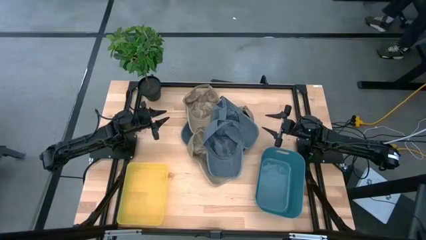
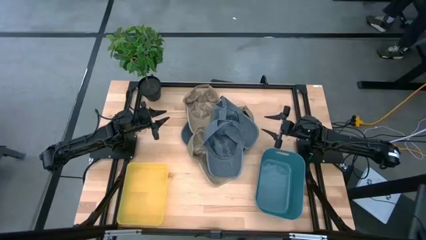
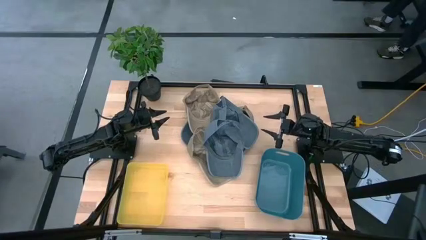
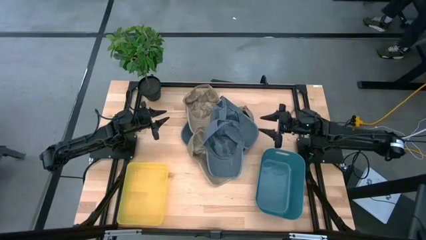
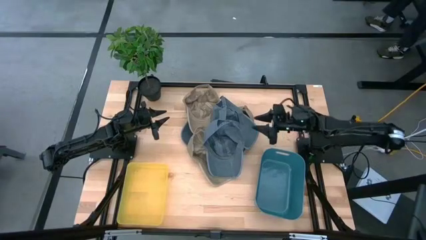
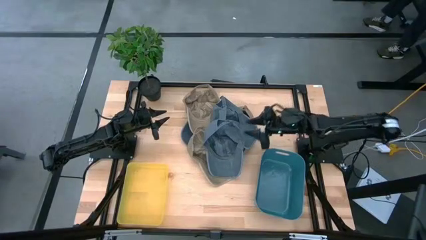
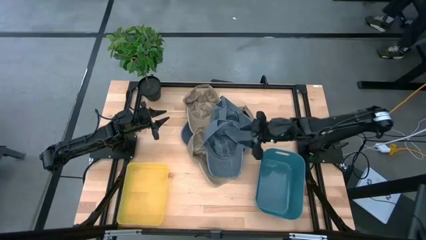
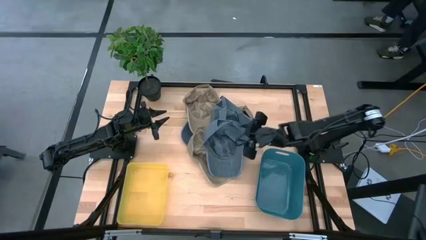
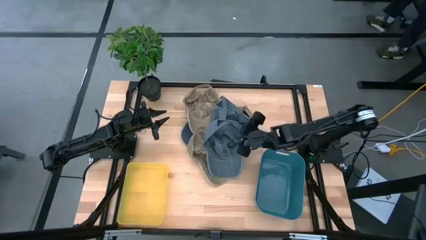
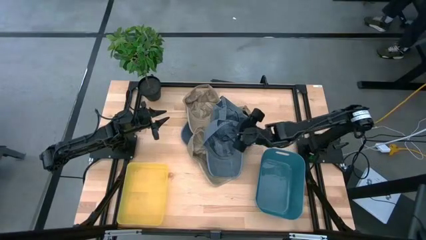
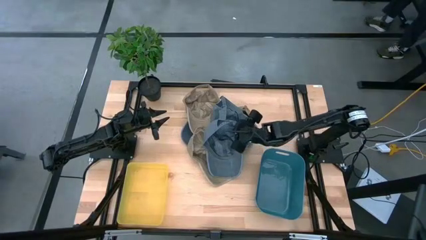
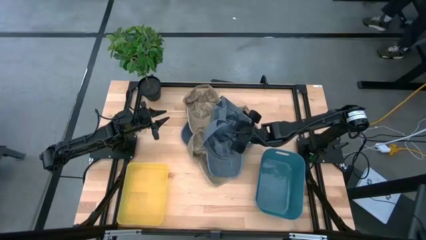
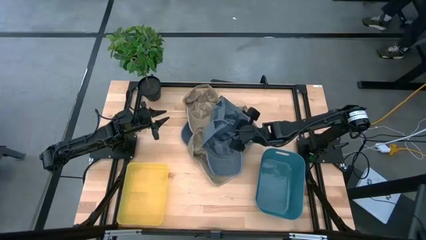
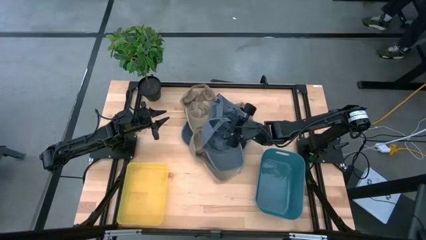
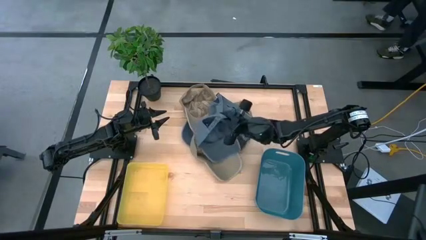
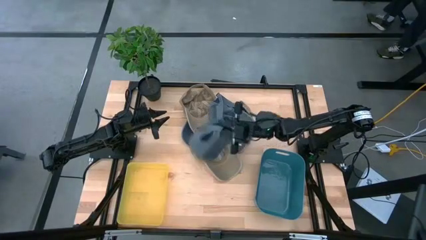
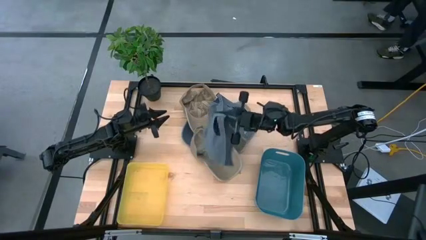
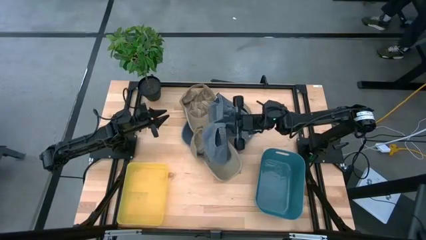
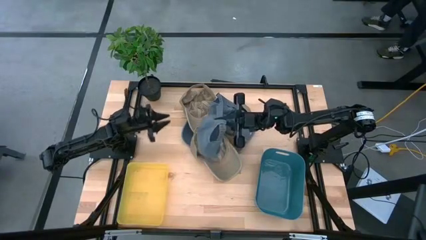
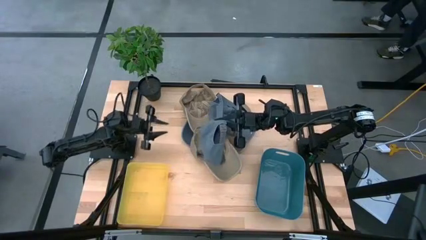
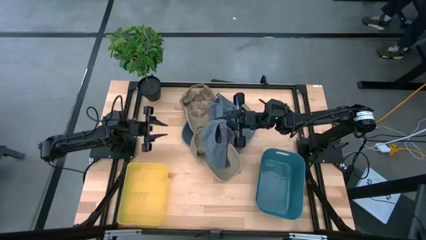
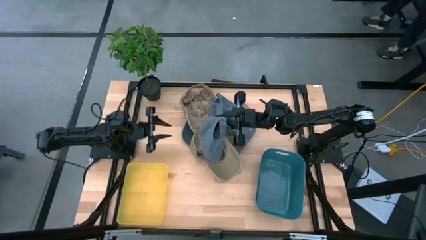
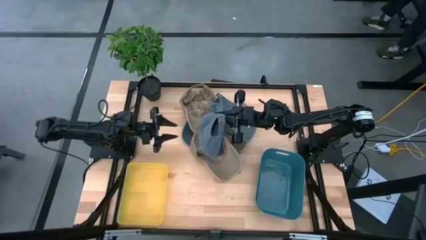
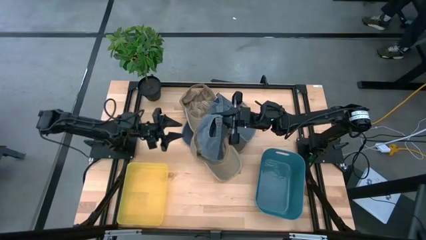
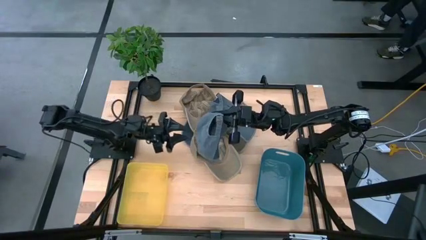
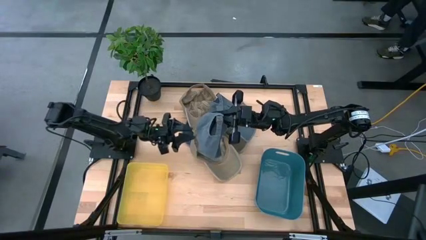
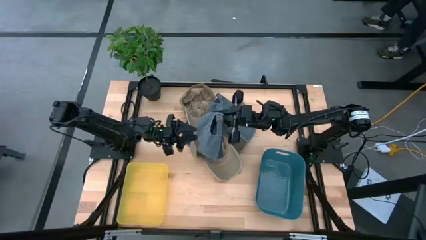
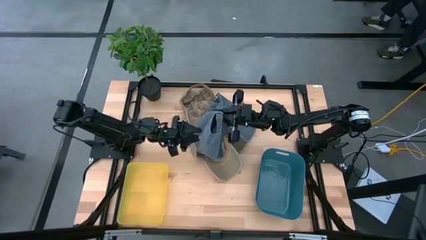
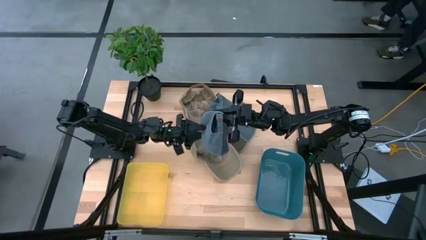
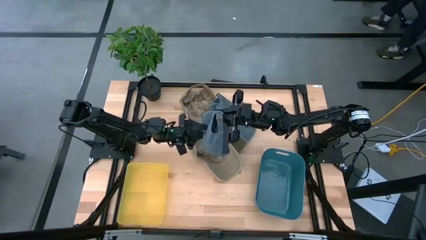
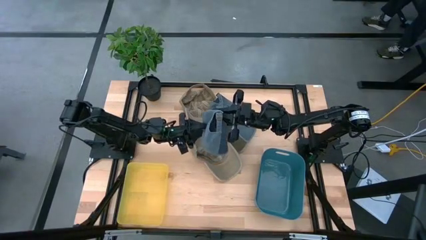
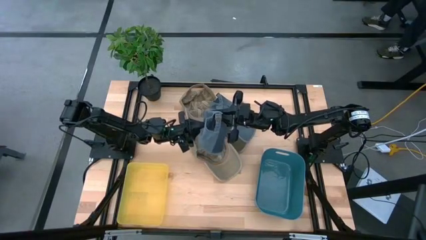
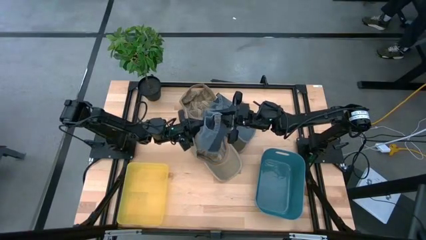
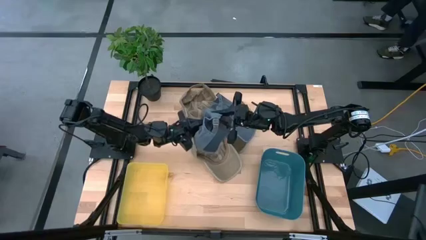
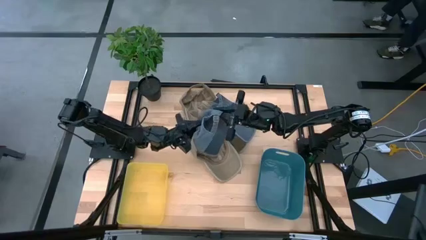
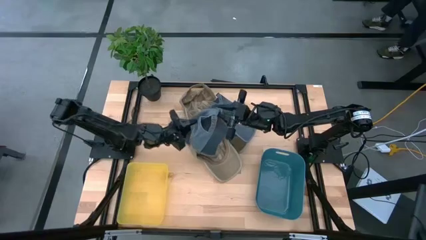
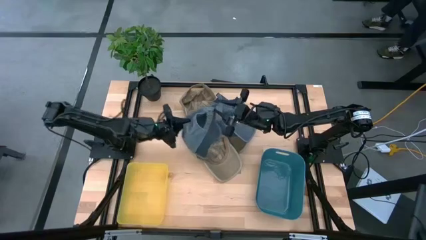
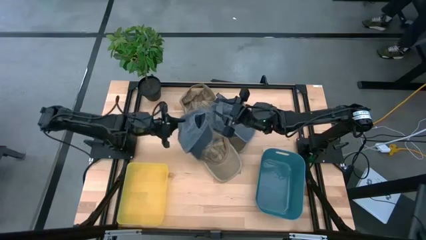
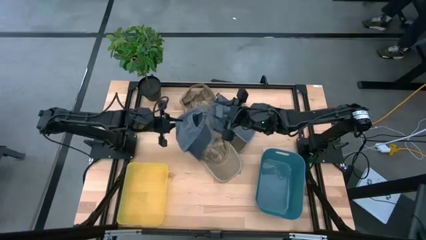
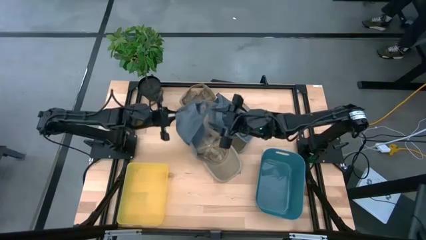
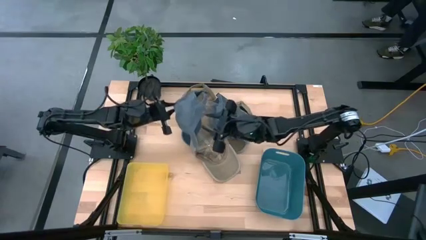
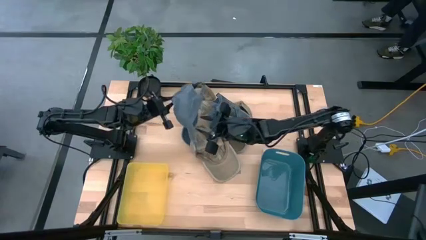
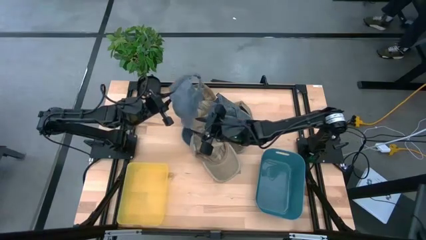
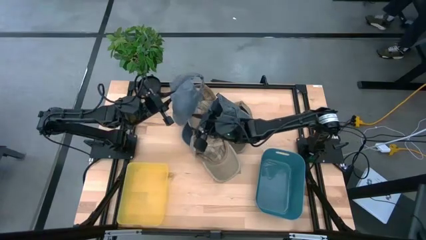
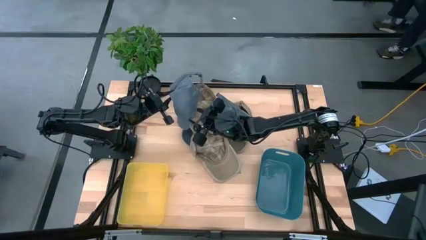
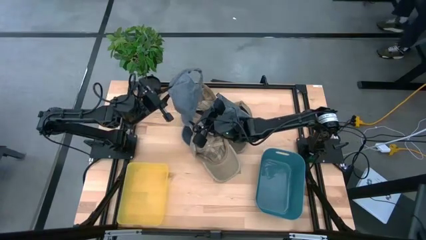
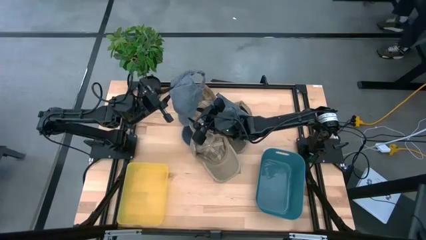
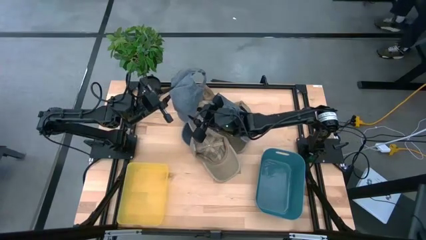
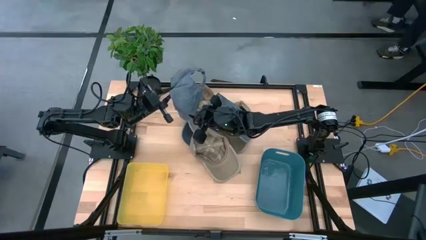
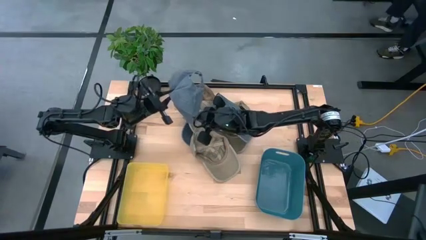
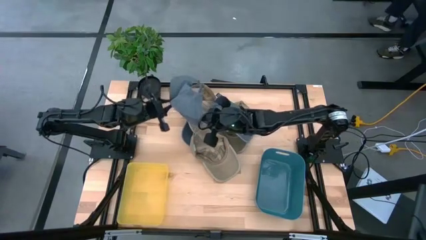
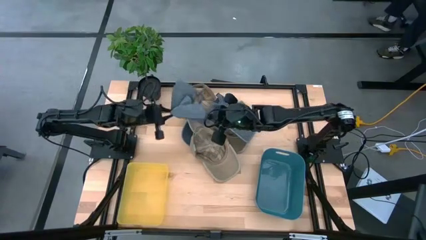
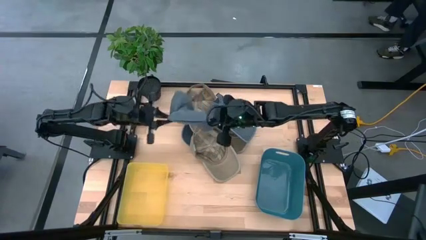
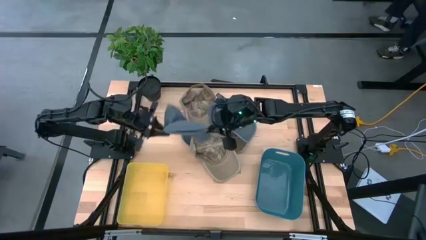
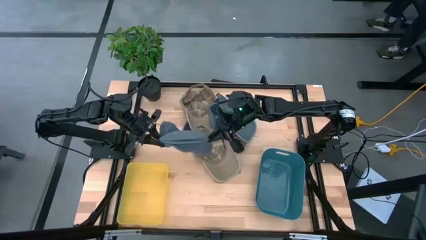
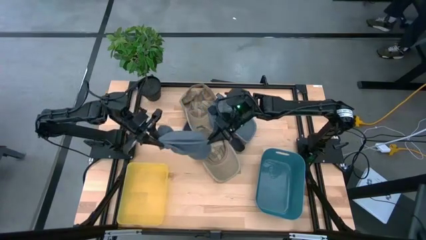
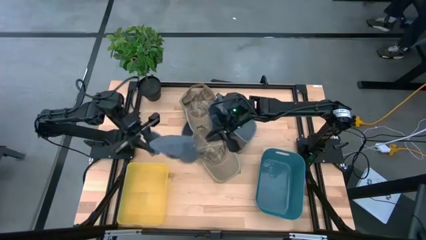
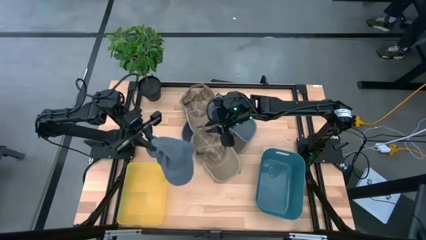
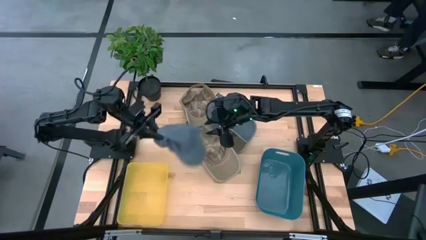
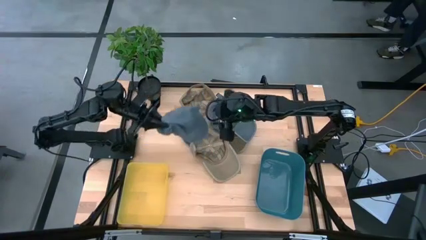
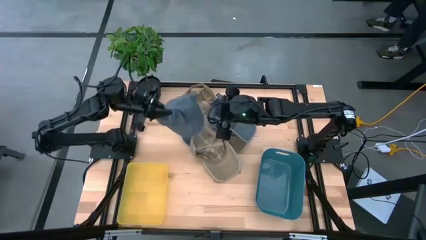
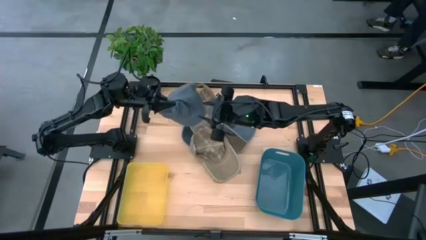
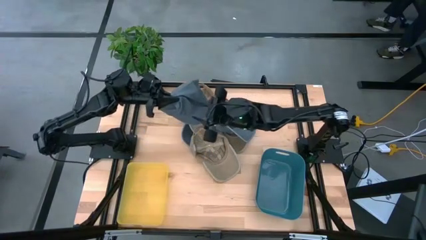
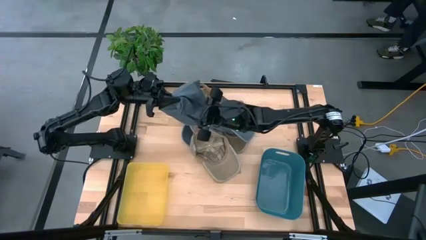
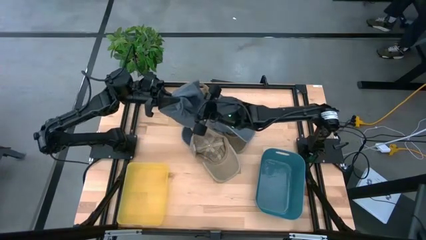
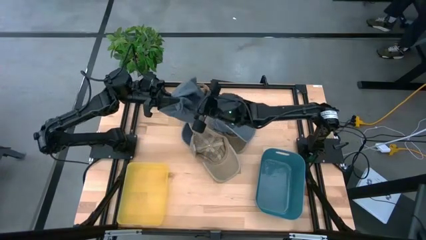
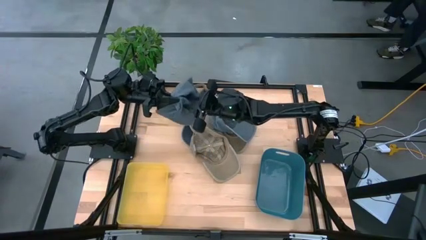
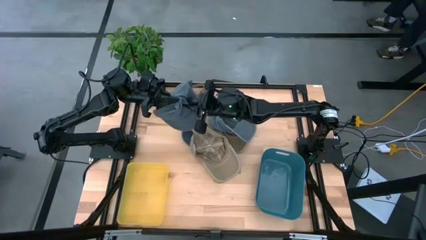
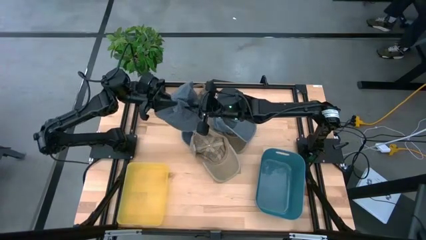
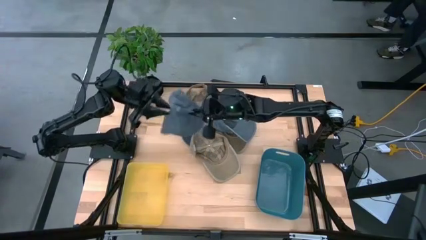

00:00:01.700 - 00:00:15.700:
Task: Pick & Place hat
Put the bottom blue cap into the blue bin
